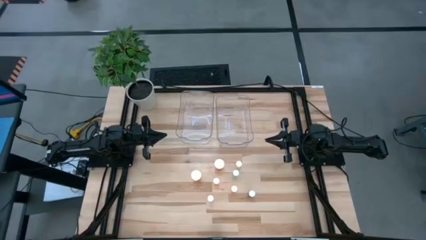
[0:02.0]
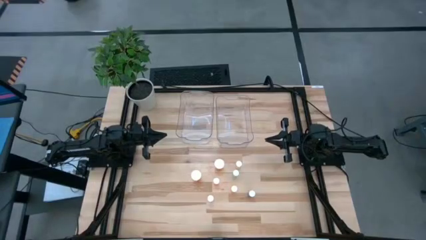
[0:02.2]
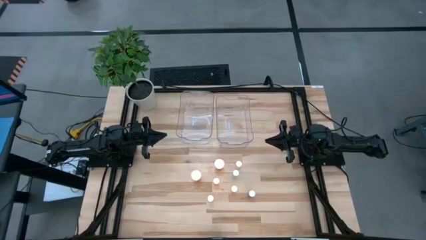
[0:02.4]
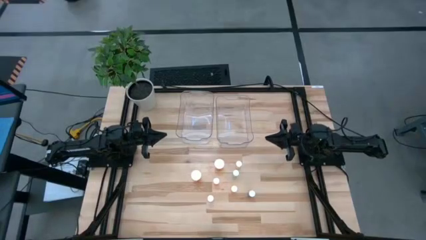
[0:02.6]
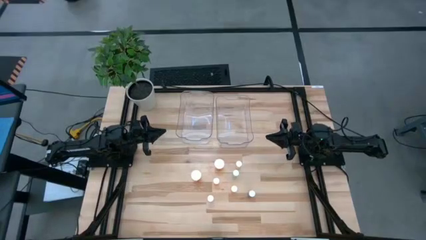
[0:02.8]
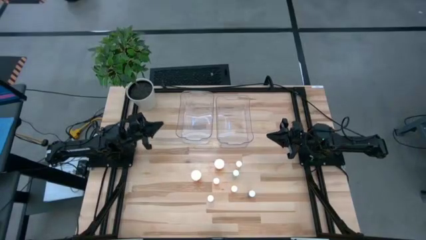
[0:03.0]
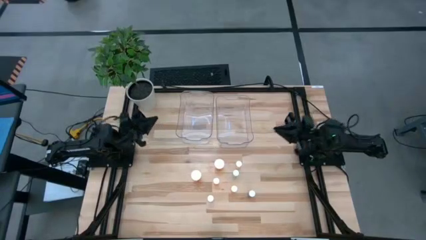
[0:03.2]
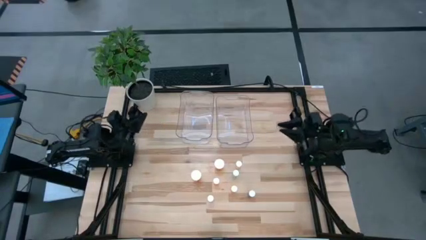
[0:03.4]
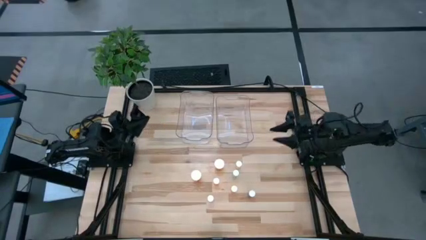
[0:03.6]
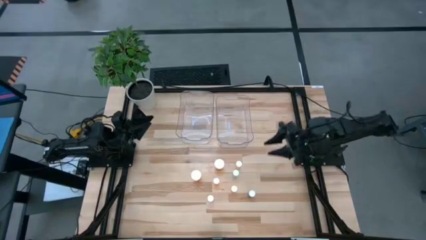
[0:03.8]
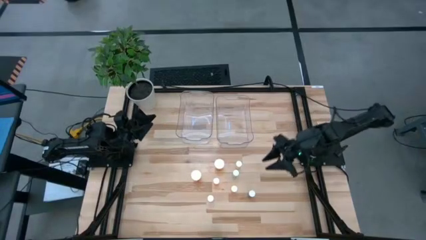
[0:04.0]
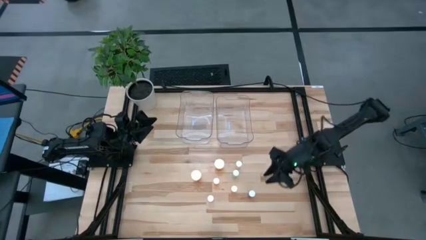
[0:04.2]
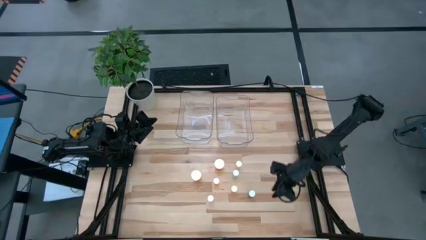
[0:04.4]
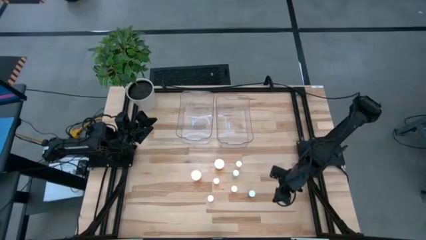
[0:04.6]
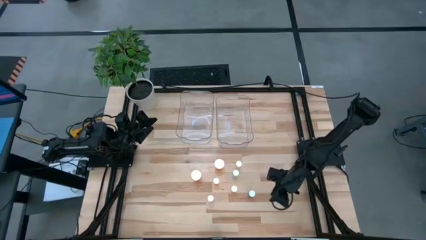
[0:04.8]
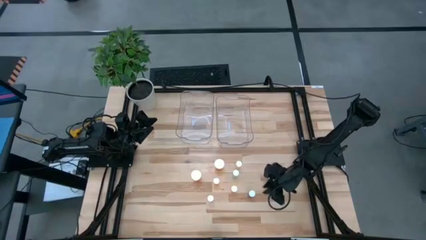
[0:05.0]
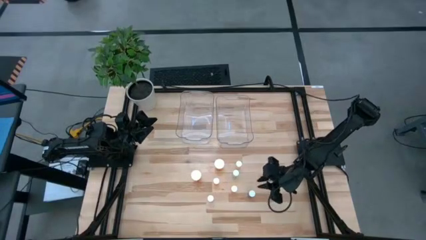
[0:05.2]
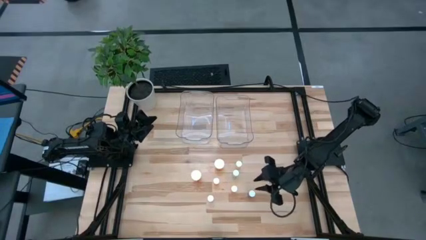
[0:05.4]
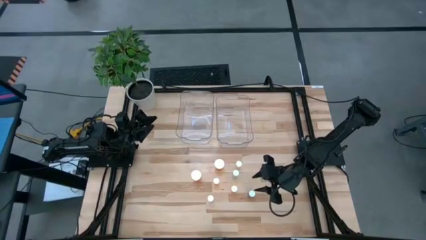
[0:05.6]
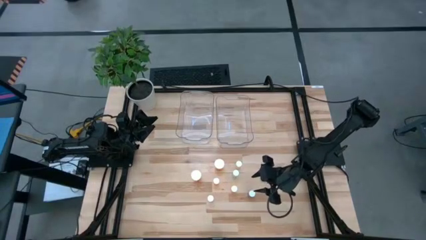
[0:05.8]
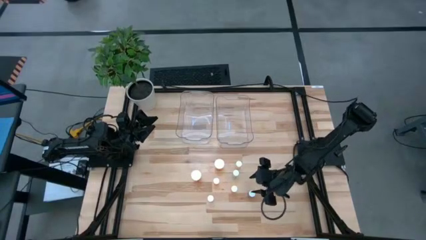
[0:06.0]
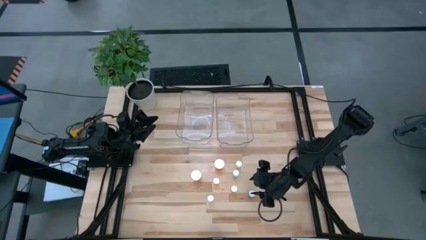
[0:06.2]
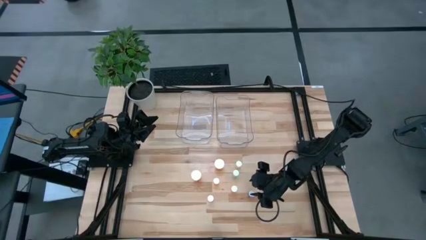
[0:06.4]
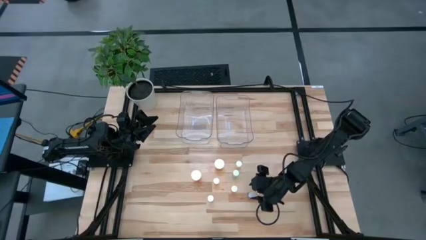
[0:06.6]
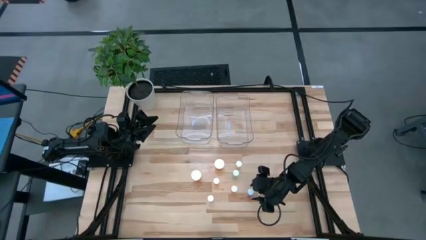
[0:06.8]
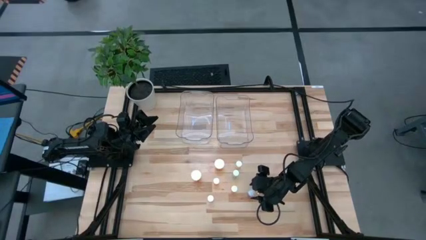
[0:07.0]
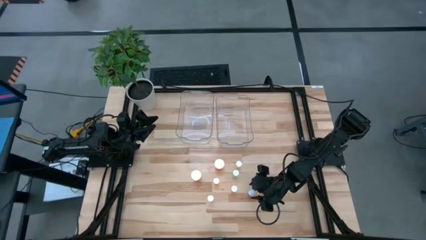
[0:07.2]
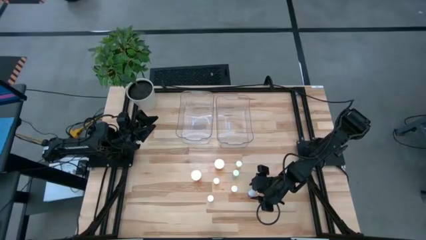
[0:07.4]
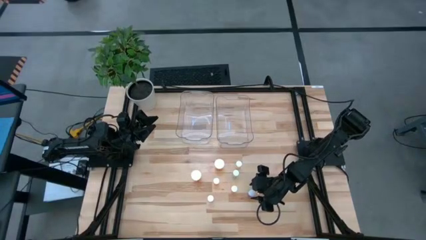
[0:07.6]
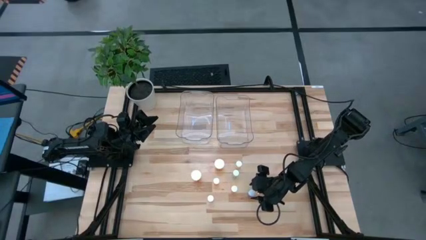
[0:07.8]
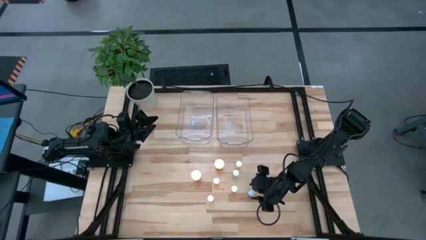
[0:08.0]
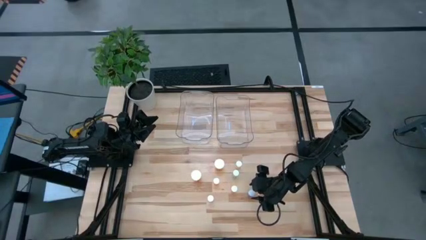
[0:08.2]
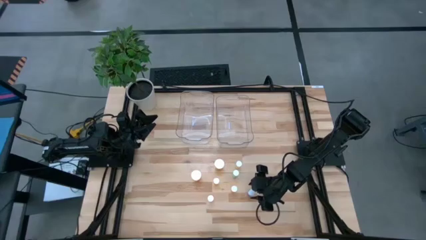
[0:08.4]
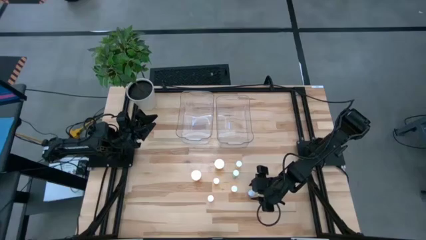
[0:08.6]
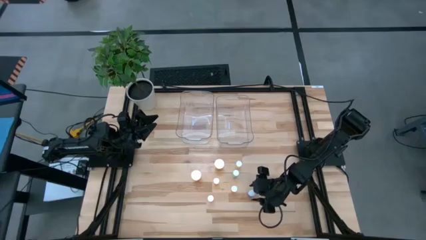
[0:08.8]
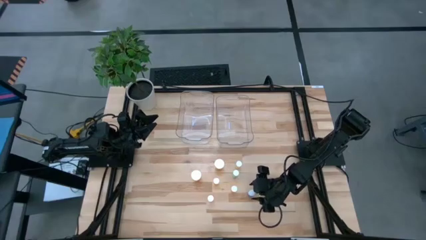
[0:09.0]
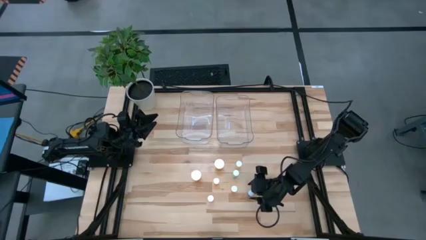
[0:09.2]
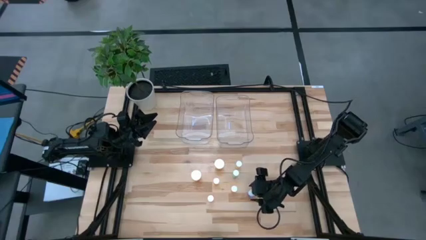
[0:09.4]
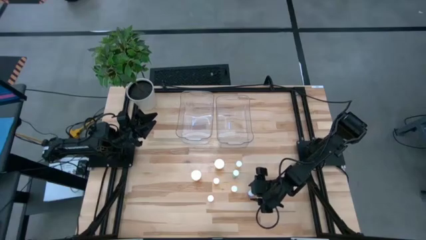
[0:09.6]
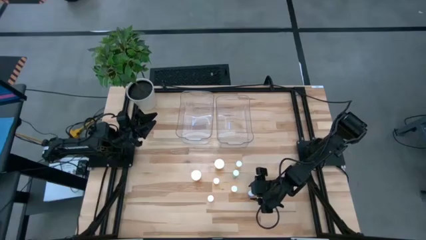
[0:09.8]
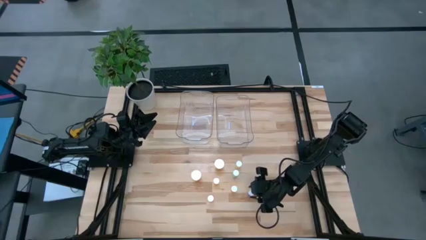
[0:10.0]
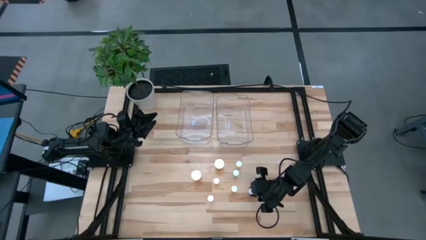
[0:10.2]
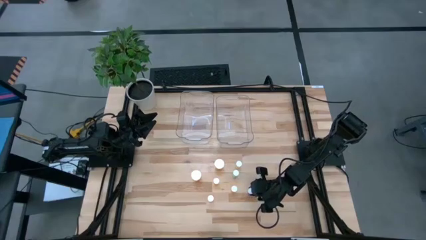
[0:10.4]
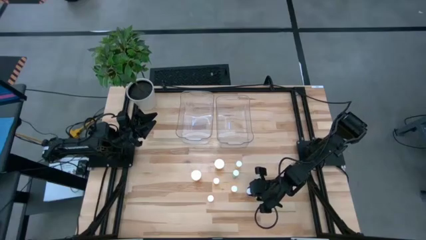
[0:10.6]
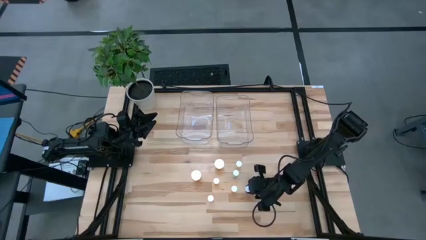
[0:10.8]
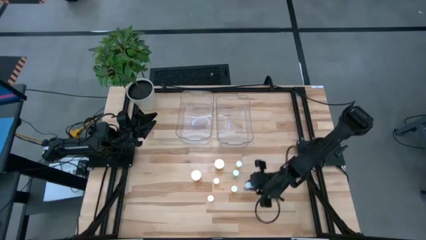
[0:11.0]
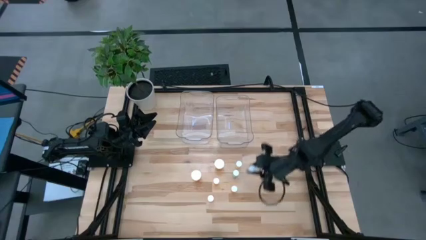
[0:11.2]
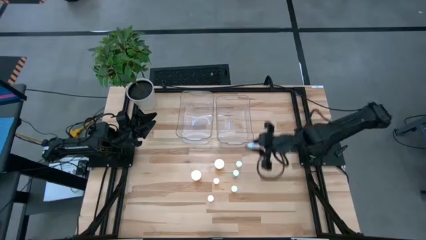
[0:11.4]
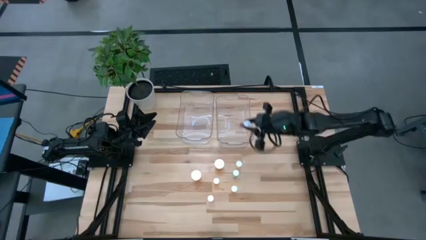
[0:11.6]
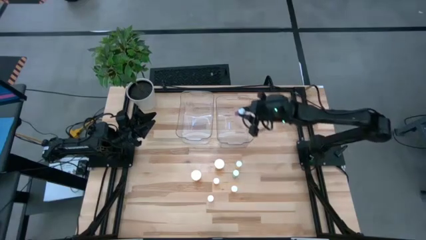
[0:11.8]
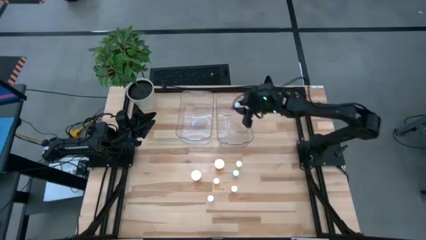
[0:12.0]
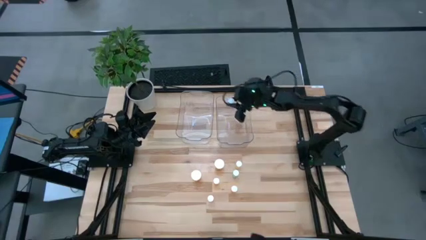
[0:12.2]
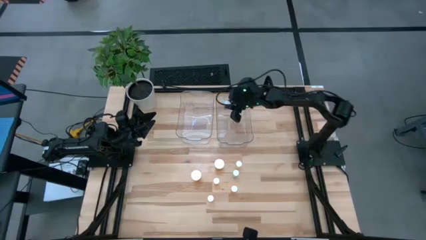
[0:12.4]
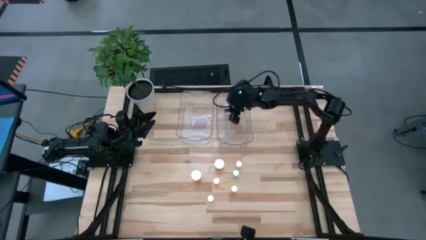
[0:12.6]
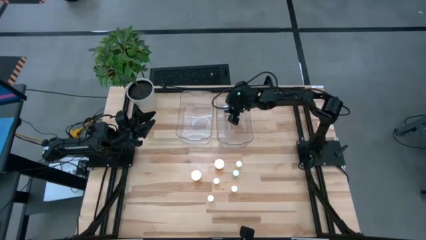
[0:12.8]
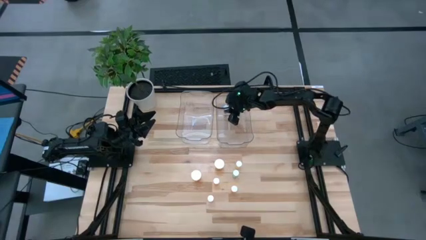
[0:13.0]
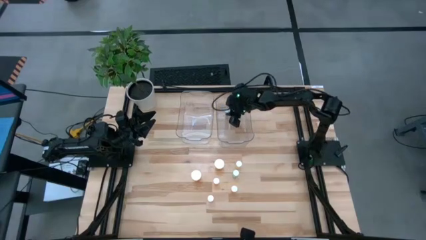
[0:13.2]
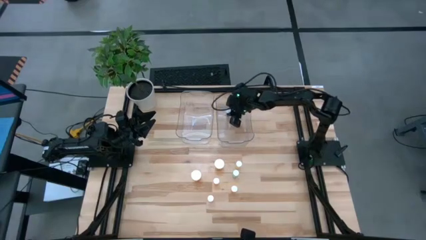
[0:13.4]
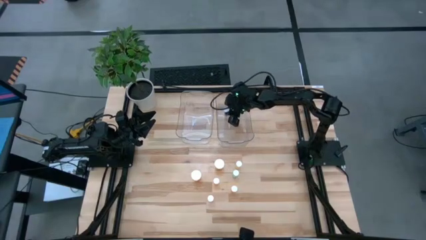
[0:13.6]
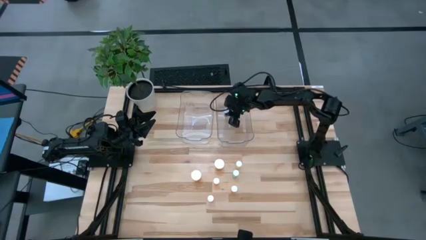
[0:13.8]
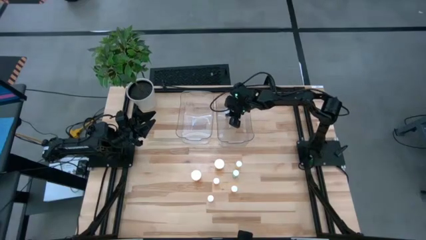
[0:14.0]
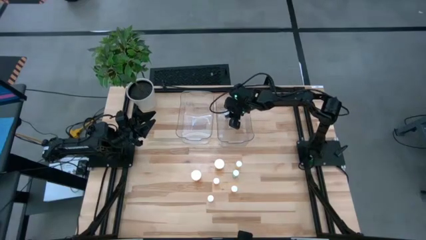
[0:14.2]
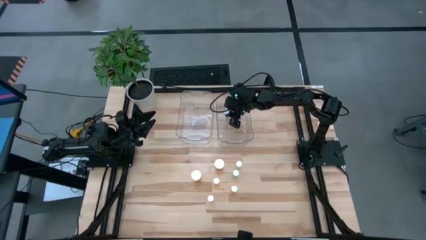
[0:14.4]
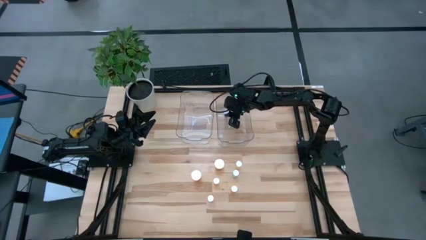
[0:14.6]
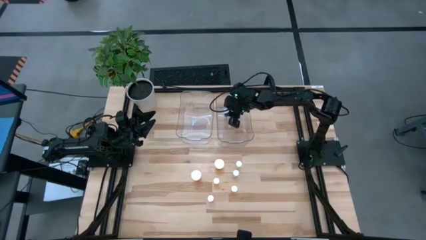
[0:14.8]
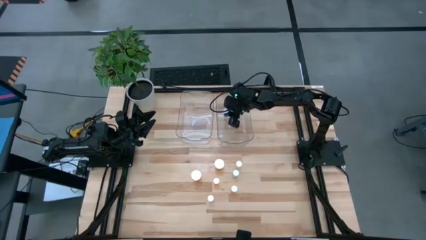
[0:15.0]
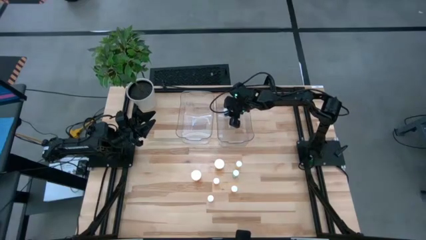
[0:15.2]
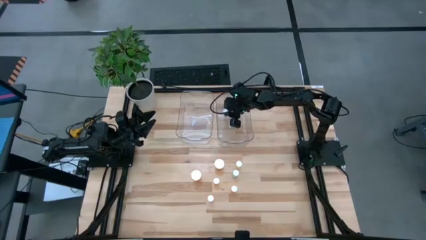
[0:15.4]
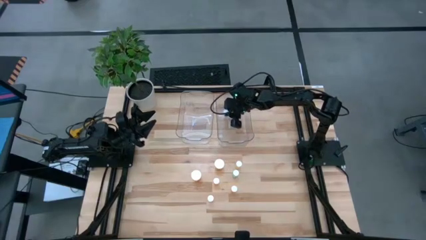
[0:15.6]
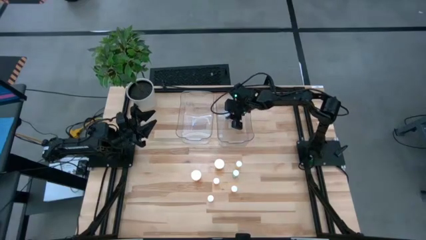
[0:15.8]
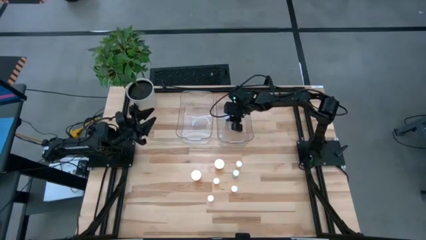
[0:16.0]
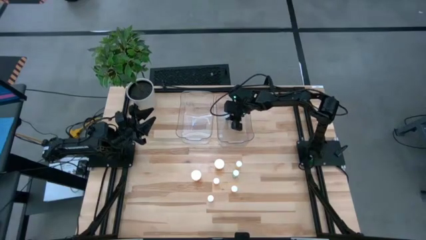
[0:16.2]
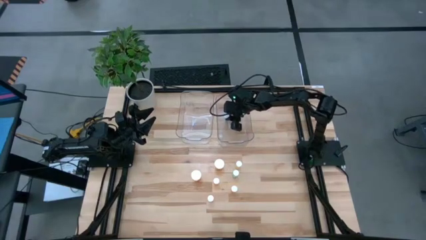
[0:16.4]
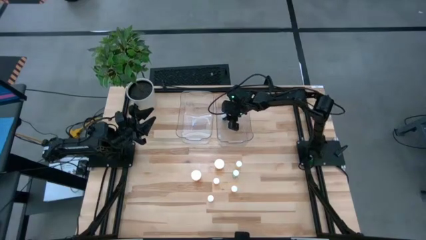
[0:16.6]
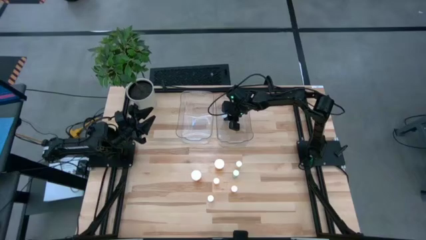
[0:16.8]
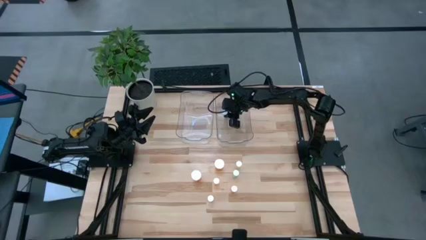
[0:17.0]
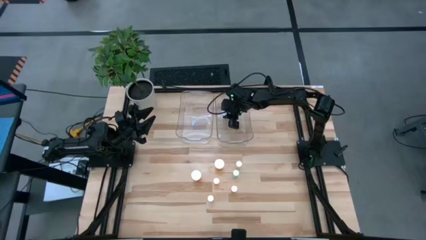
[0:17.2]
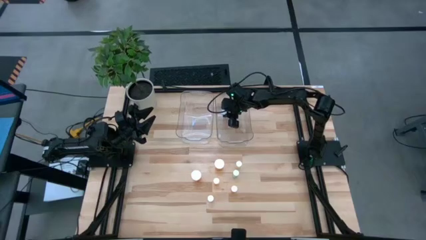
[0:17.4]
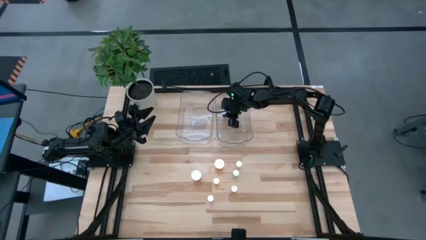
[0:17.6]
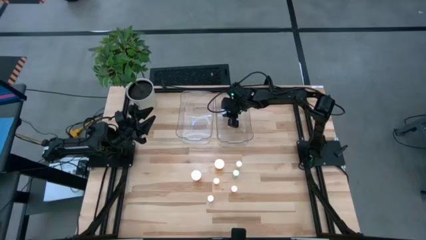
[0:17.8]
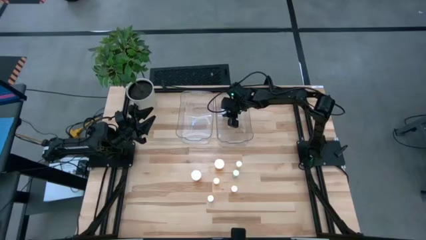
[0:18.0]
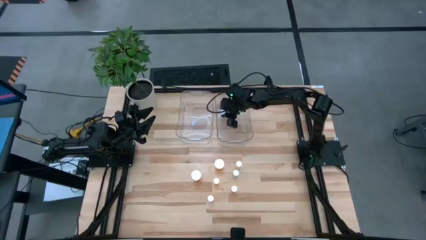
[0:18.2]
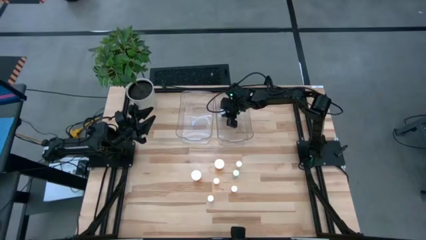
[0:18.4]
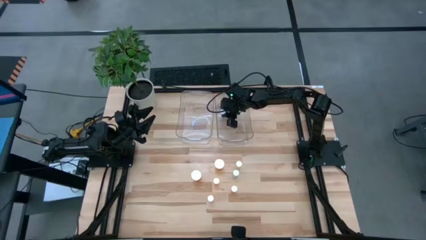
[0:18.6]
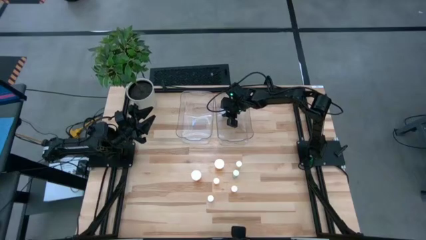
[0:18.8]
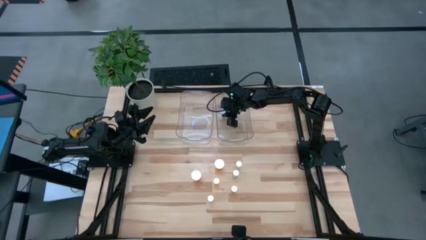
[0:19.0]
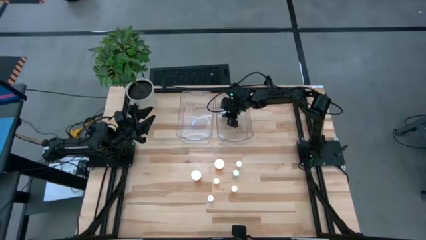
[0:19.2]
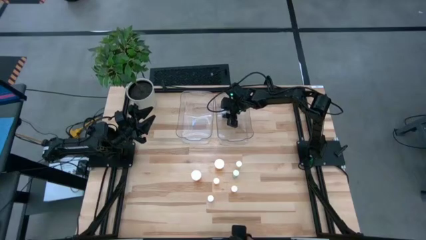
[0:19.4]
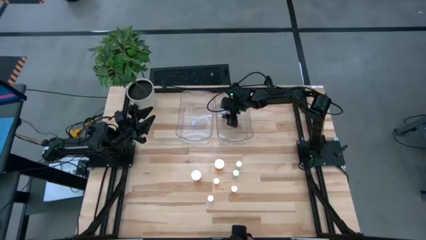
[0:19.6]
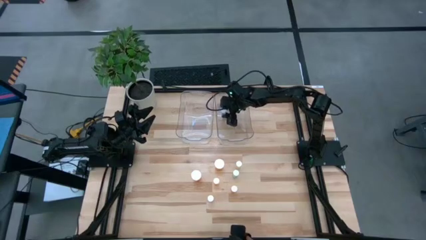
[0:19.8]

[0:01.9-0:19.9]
Task: Pick and place medicine bottles into bin by pill shape (circle, oval)
Put the blue capsule bottle into the left transparent bin
